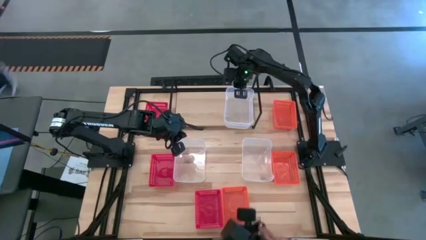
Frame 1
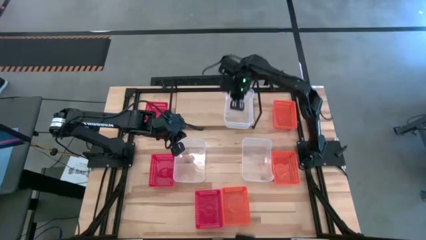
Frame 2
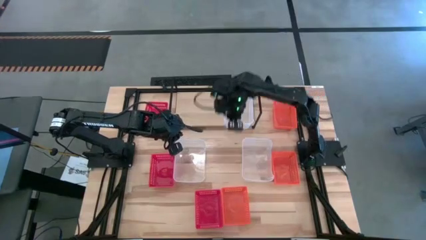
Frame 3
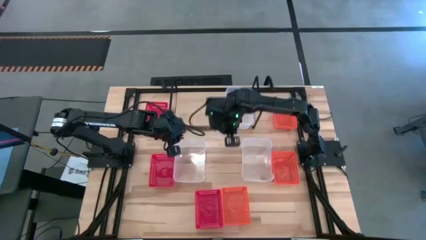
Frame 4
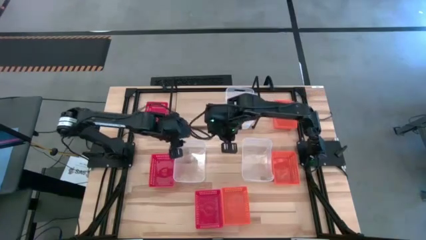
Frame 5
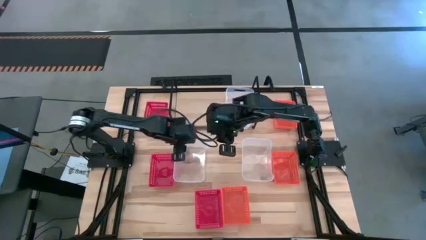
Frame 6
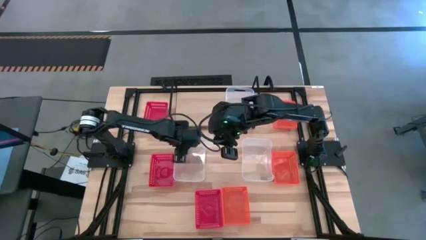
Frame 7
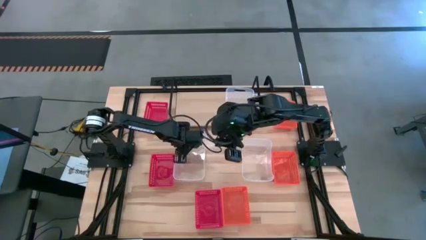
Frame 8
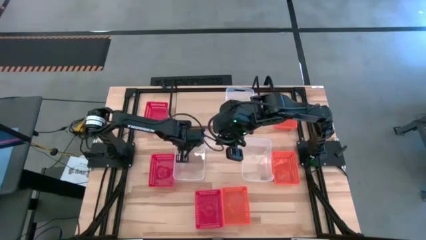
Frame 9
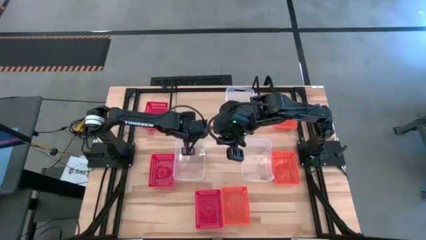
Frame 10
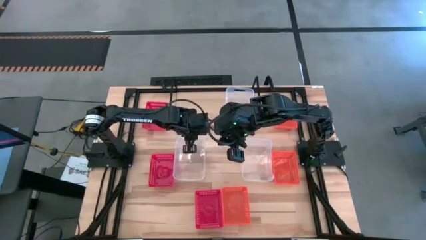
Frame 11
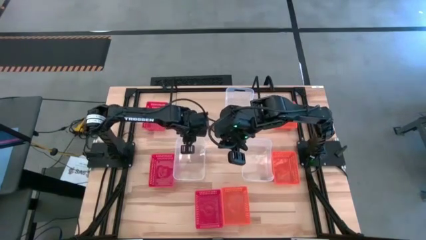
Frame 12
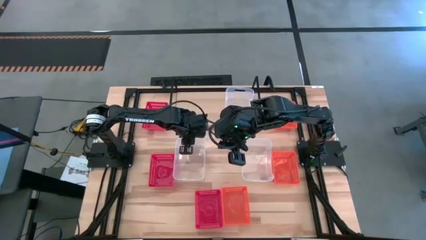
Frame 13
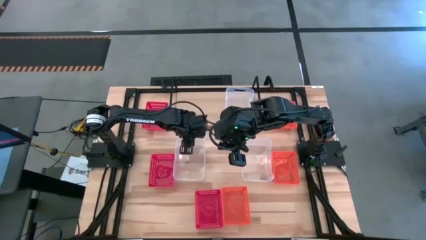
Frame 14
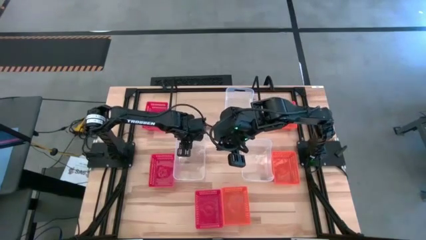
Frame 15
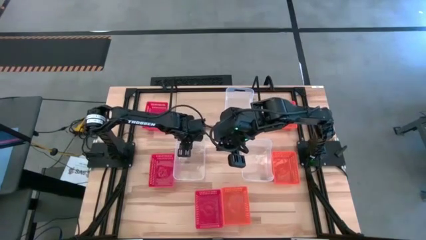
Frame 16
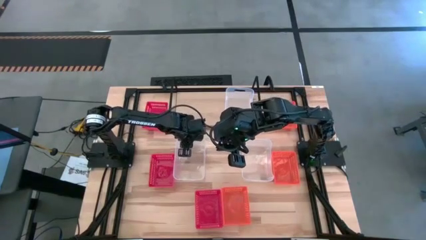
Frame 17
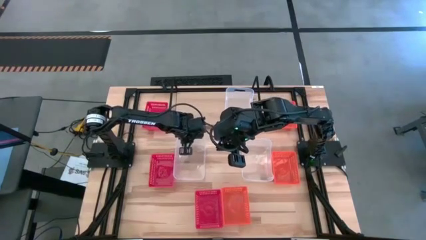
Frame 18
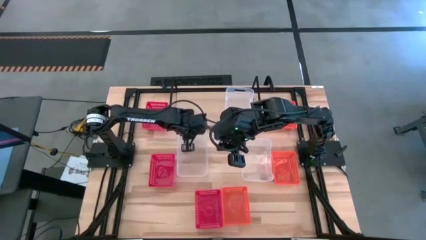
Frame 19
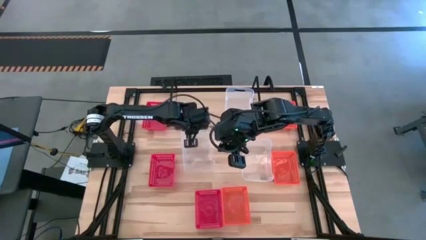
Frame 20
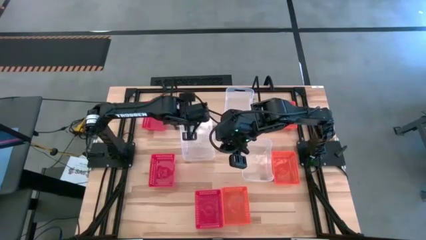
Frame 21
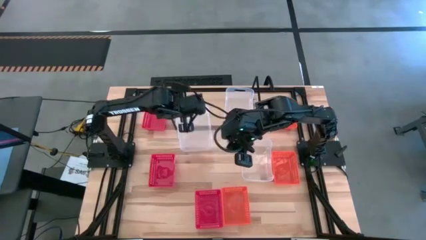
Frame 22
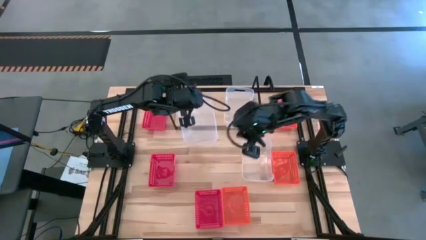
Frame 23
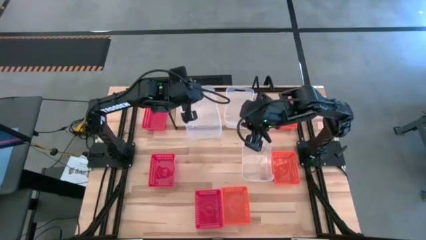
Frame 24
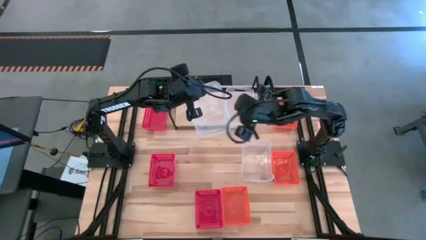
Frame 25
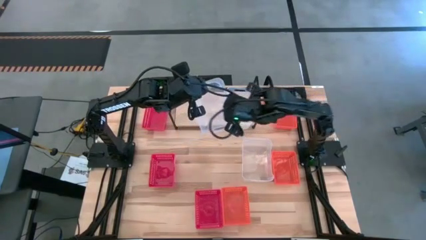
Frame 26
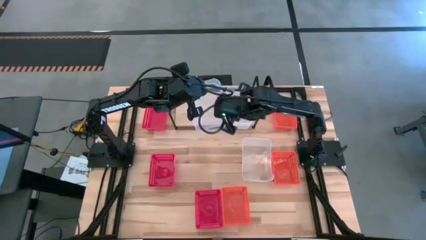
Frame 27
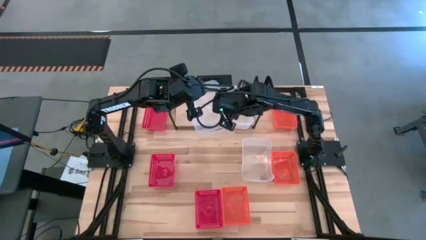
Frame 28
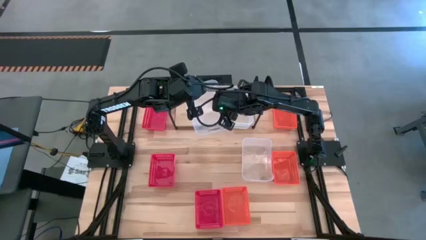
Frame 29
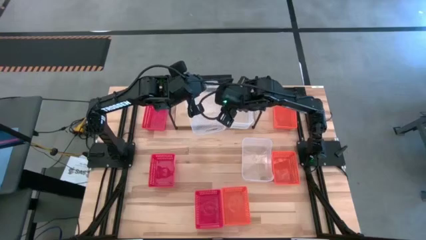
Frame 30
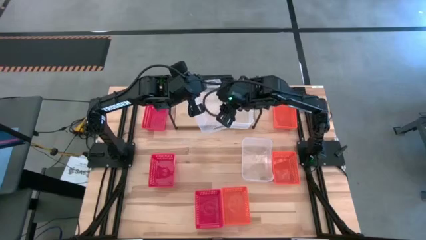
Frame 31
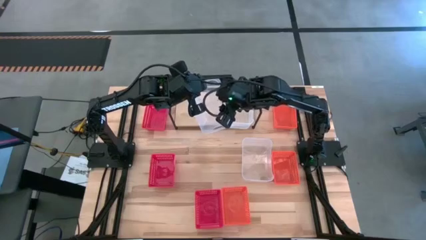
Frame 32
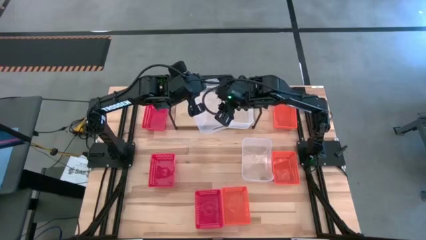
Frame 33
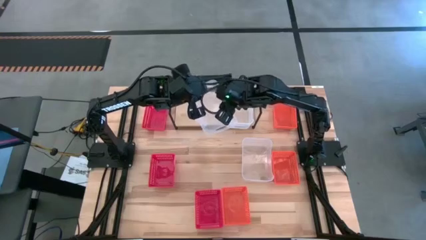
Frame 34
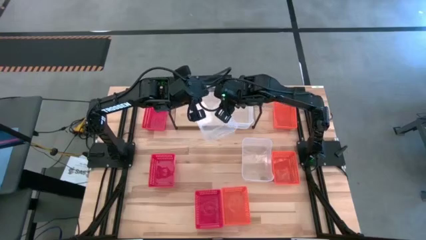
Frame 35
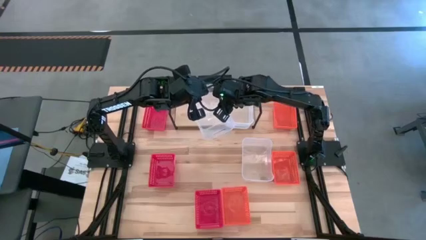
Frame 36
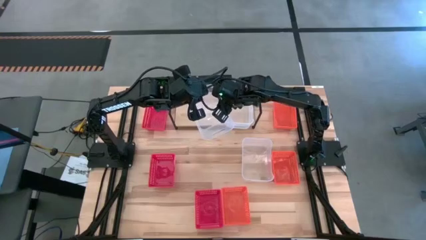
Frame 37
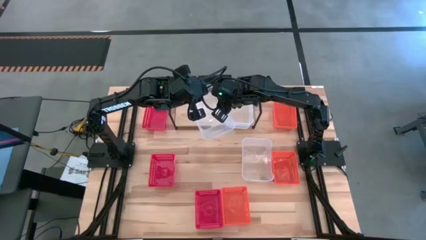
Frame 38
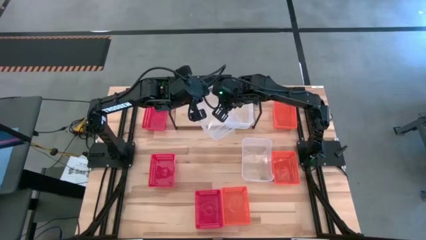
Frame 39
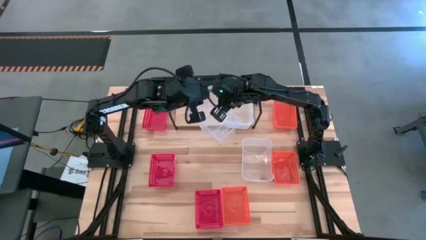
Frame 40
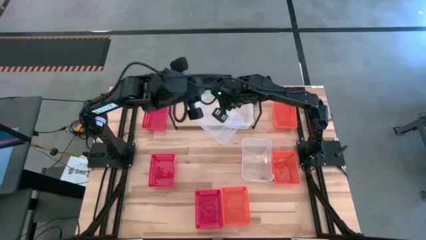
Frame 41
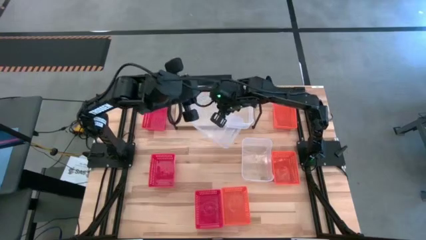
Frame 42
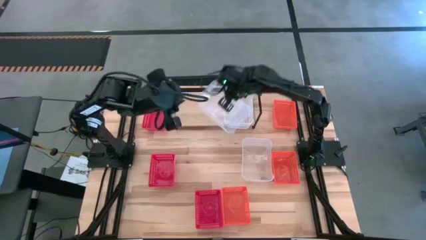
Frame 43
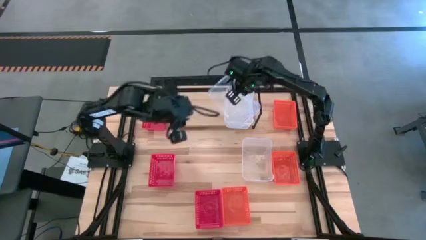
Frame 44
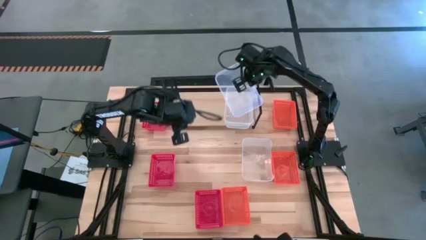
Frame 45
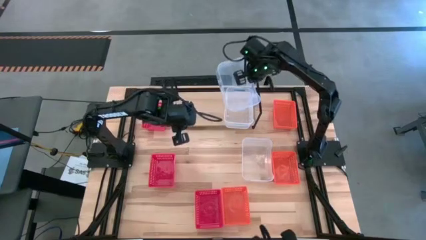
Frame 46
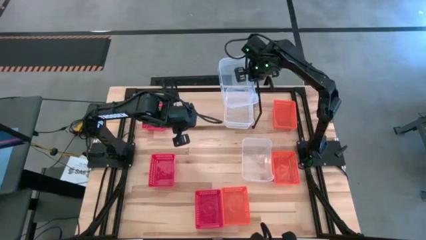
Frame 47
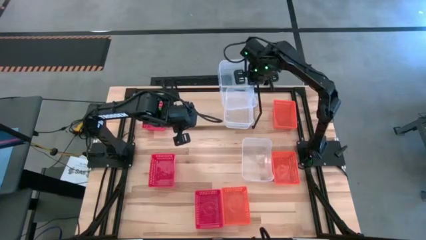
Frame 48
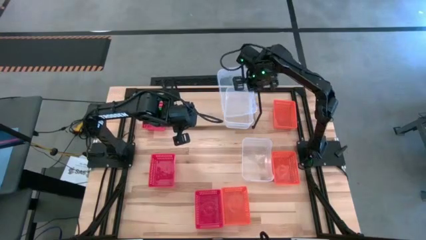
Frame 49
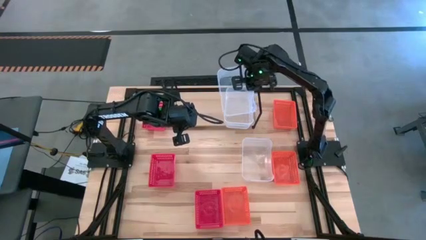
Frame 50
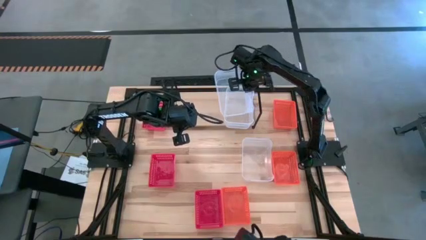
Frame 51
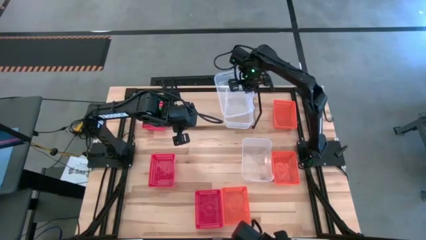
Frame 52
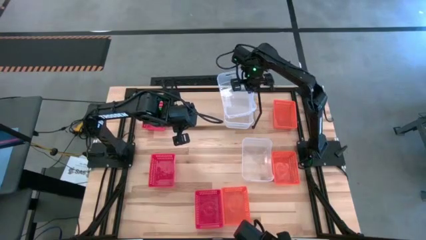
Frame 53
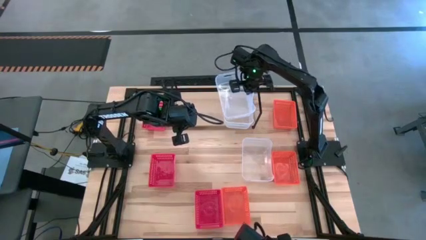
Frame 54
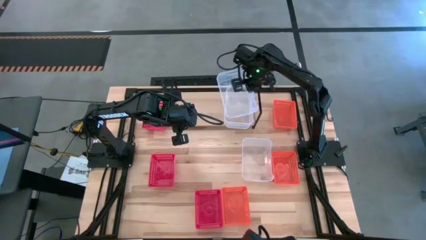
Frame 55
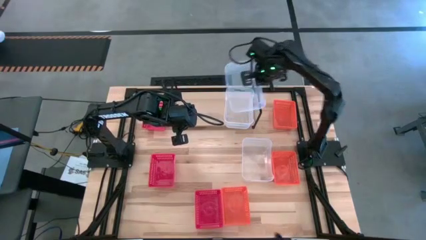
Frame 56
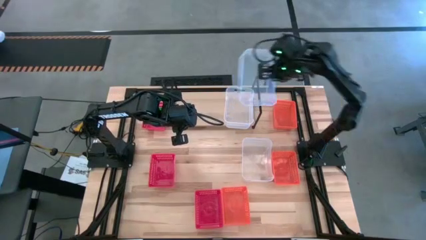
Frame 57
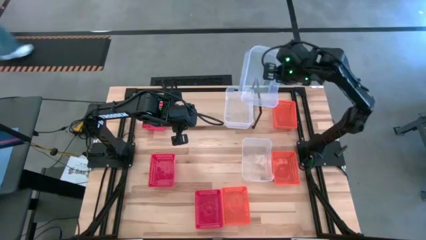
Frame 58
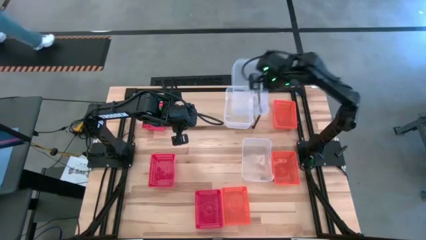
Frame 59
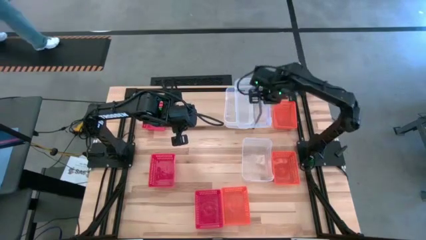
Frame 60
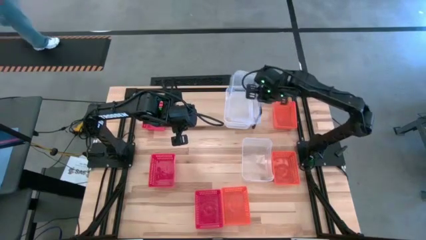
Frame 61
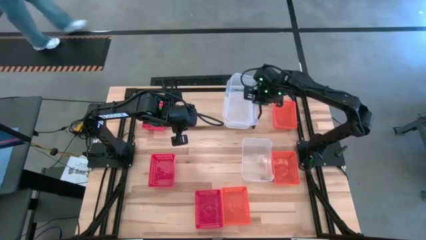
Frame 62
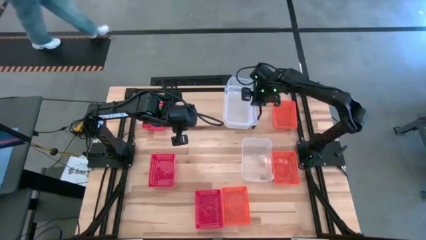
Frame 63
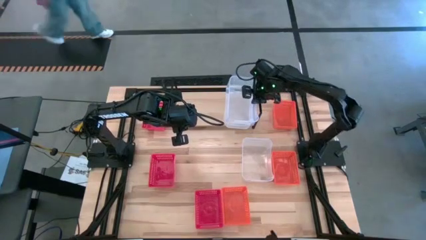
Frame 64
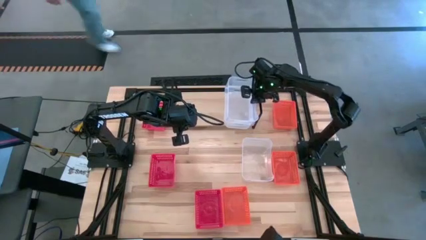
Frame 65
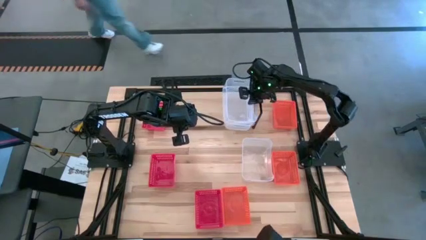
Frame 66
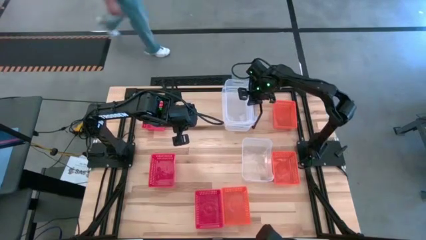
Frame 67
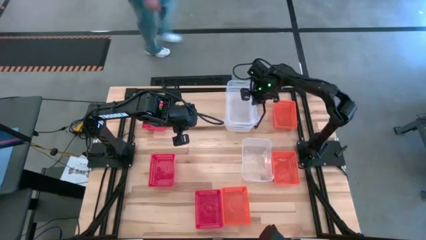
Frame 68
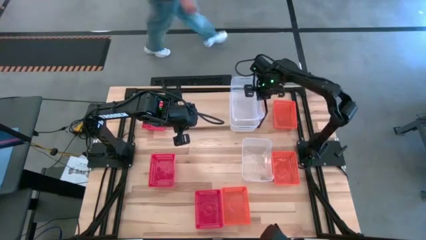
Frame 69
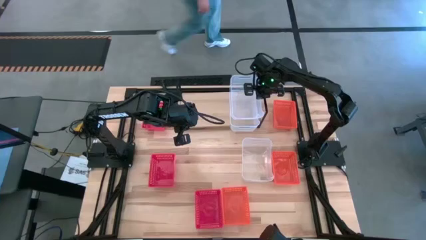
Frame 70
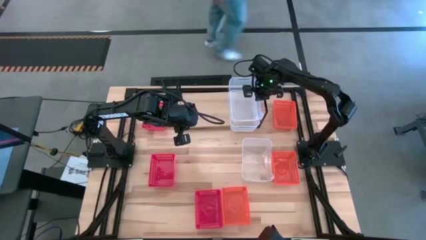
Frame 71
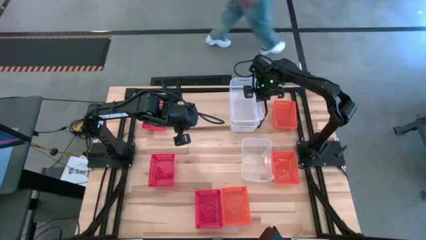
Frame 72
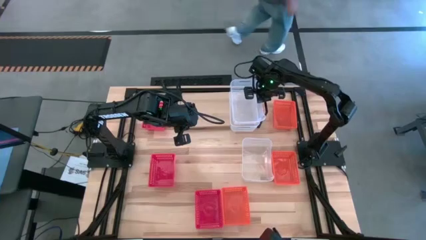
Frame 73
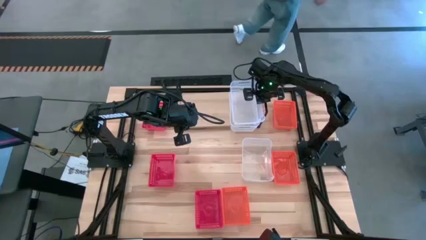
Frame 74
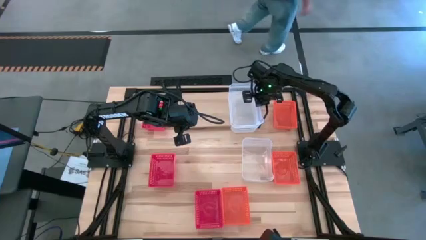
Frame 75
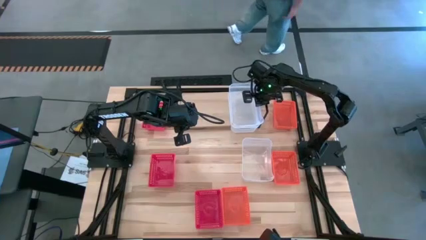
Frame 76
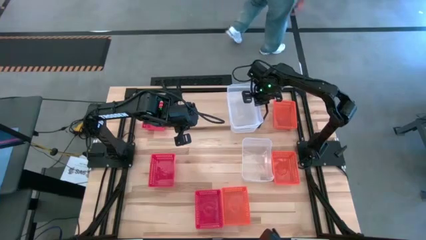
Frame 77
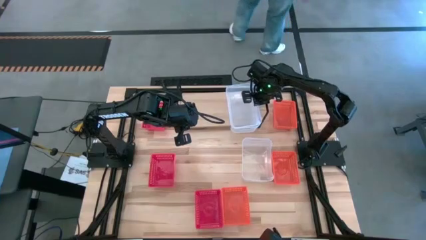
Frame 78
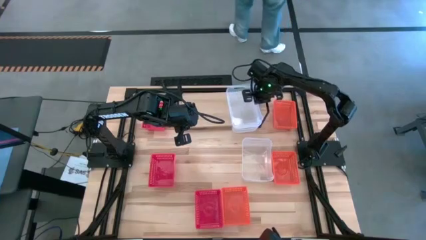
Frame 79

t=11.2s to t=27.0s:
Task: Stack baskets on shelf by color
Stack the left white bin on top of the white bin on the shelf
